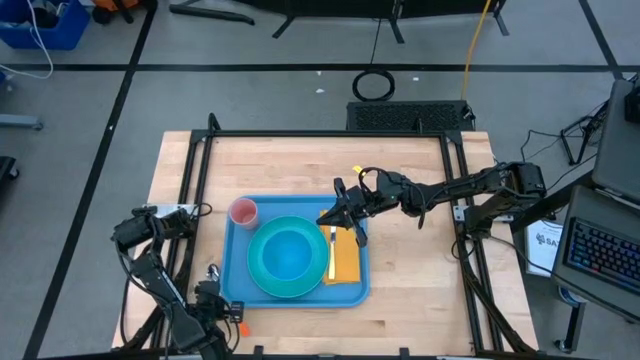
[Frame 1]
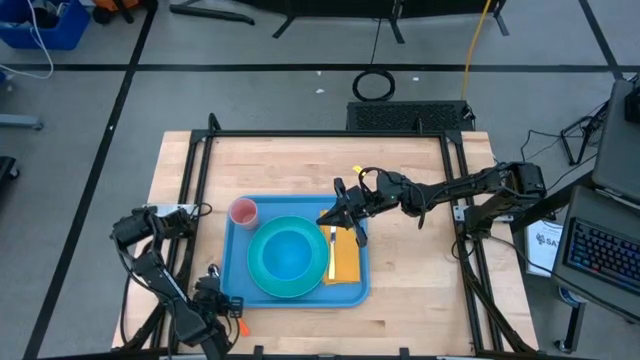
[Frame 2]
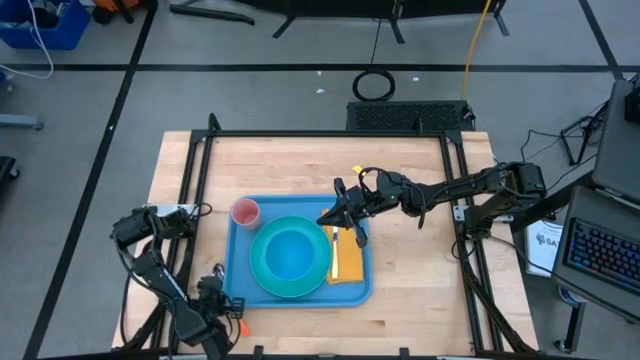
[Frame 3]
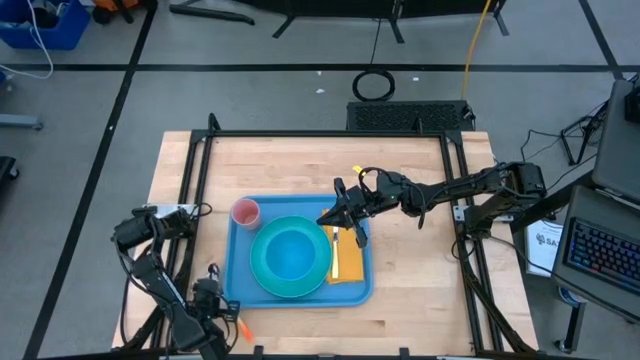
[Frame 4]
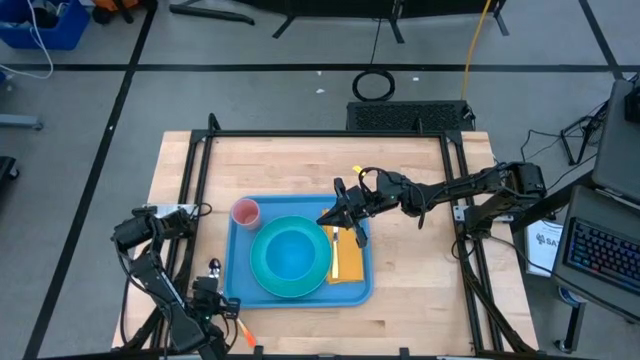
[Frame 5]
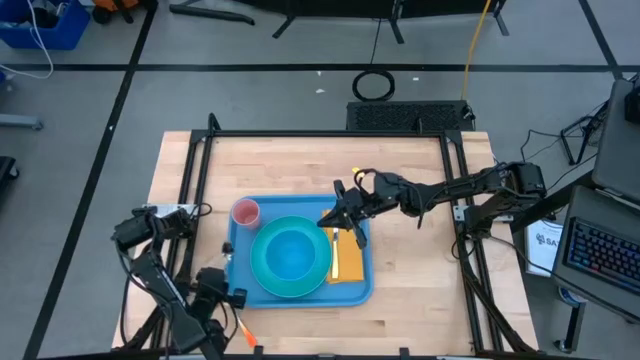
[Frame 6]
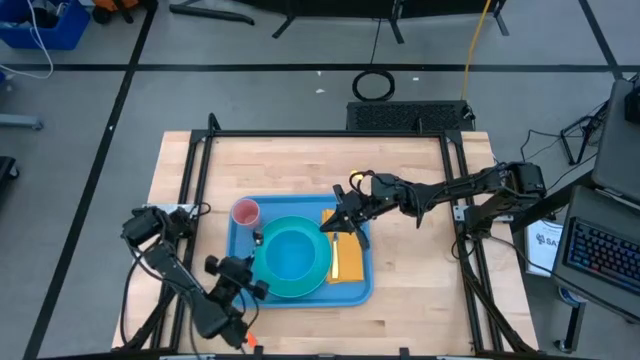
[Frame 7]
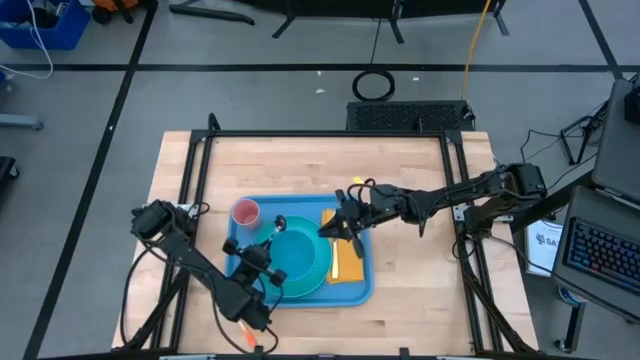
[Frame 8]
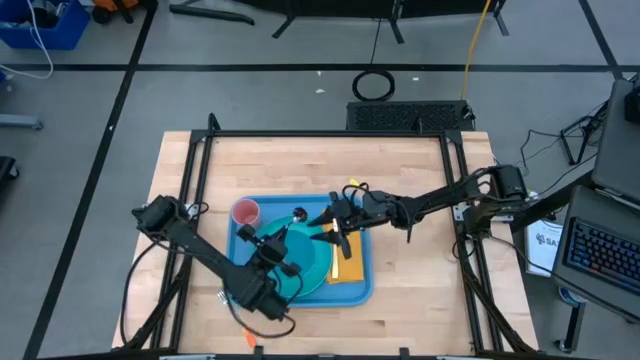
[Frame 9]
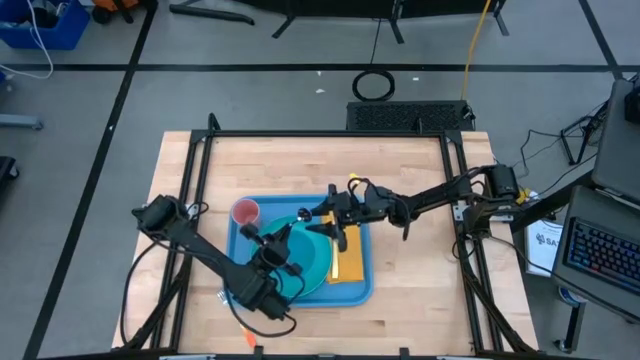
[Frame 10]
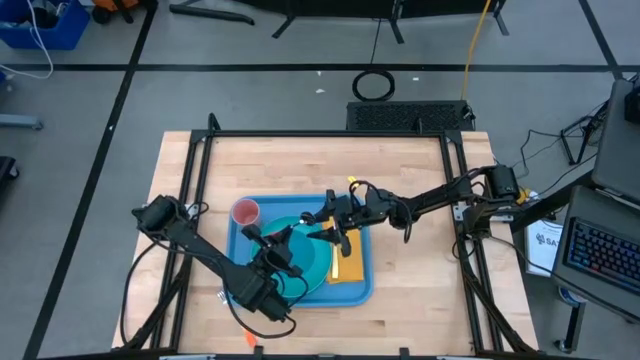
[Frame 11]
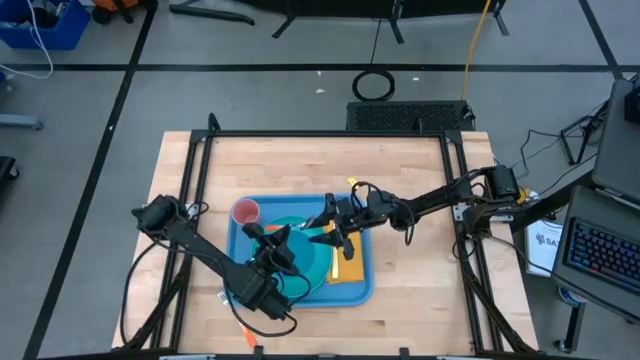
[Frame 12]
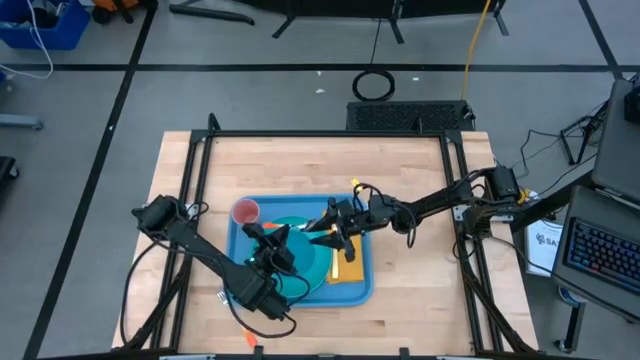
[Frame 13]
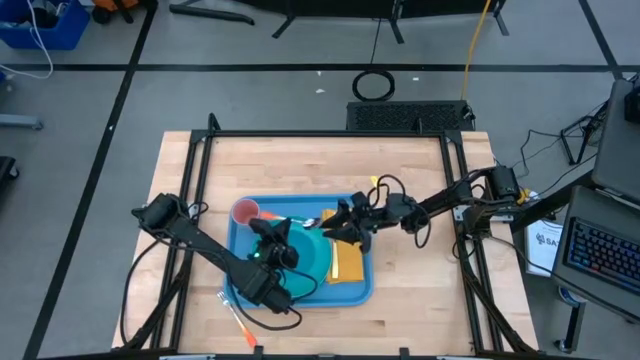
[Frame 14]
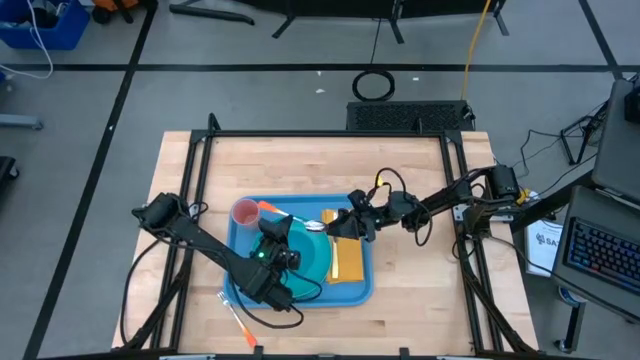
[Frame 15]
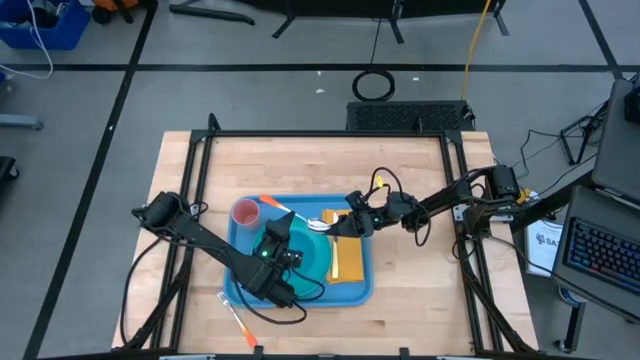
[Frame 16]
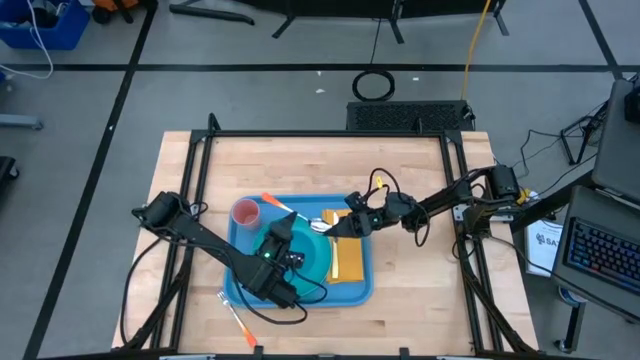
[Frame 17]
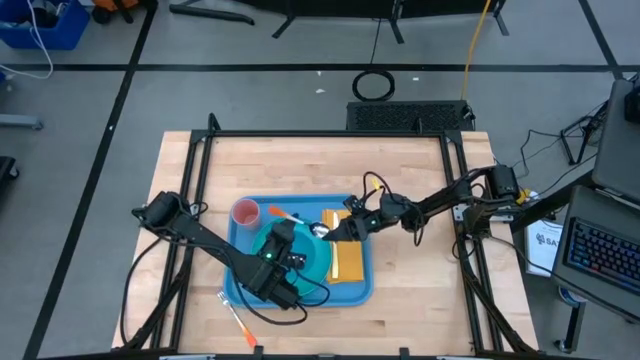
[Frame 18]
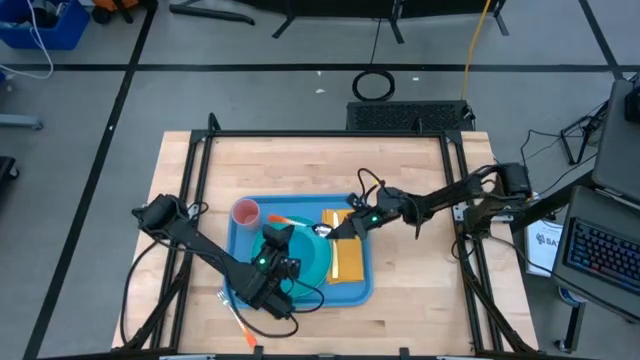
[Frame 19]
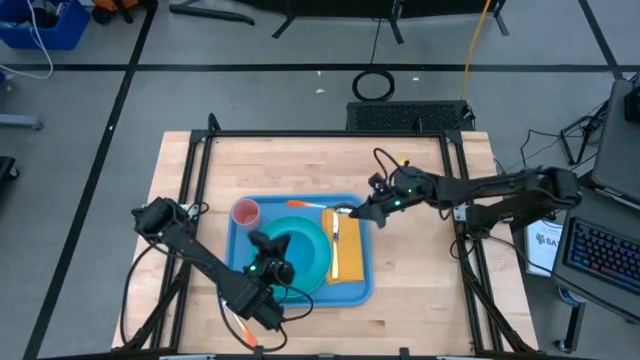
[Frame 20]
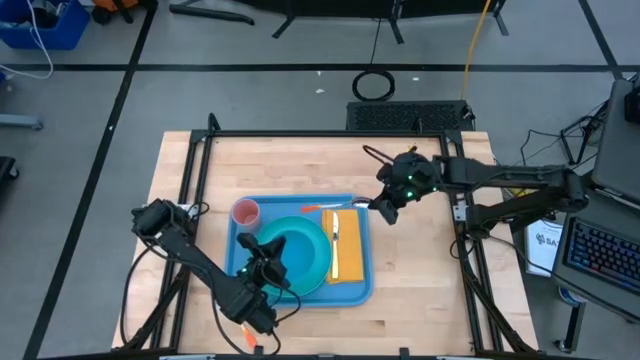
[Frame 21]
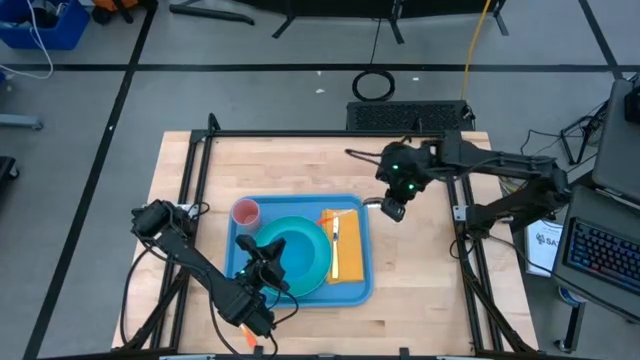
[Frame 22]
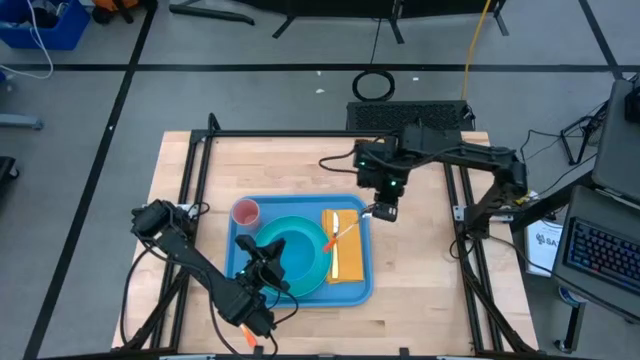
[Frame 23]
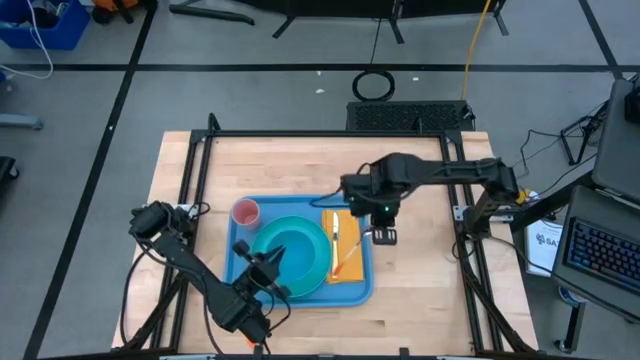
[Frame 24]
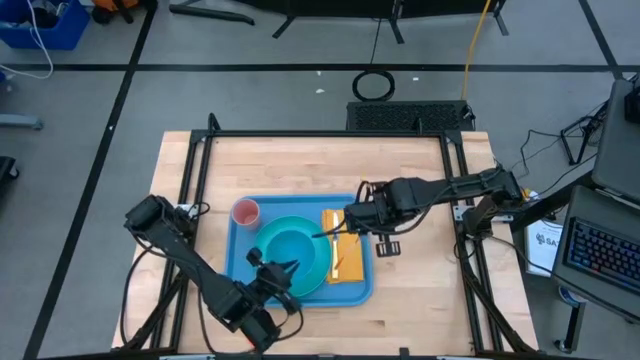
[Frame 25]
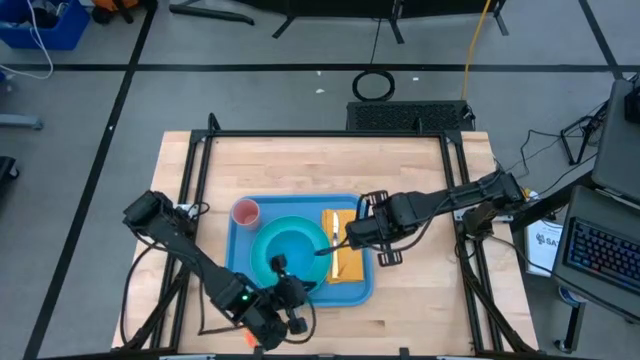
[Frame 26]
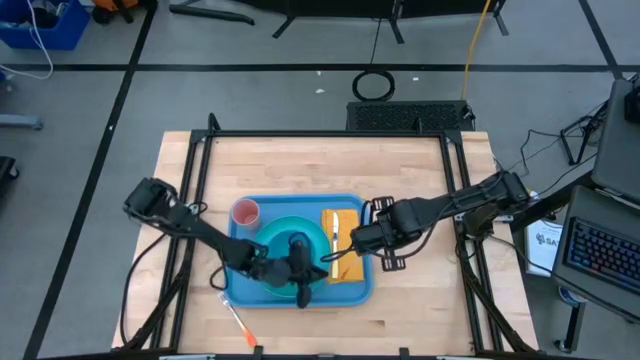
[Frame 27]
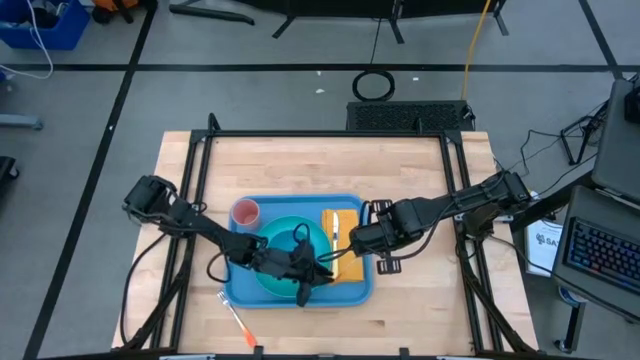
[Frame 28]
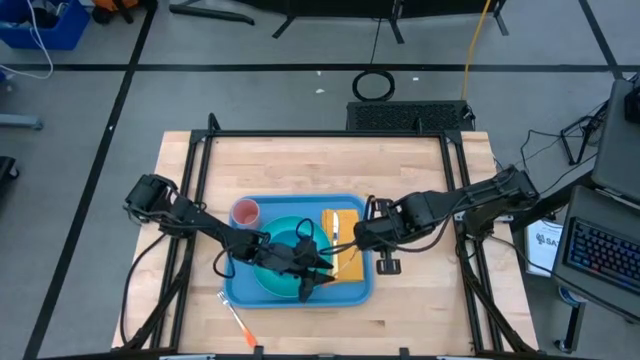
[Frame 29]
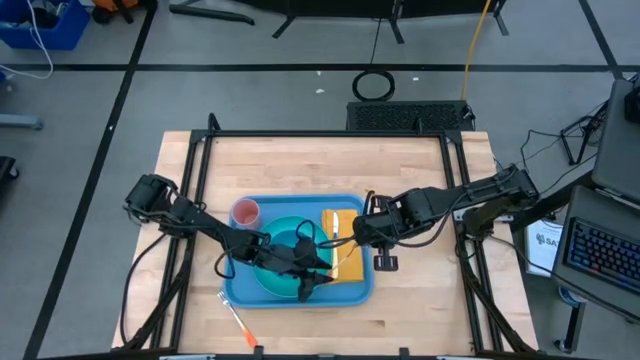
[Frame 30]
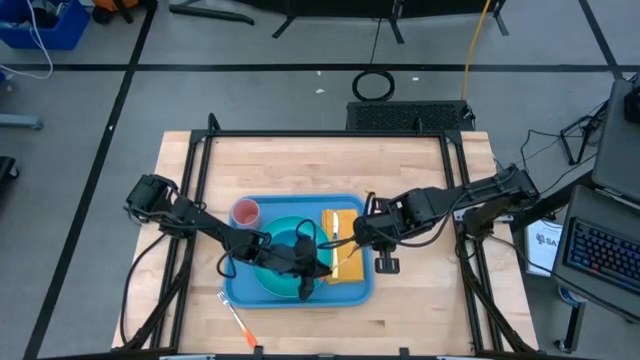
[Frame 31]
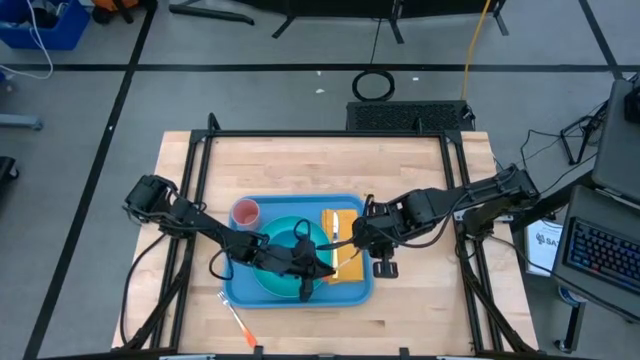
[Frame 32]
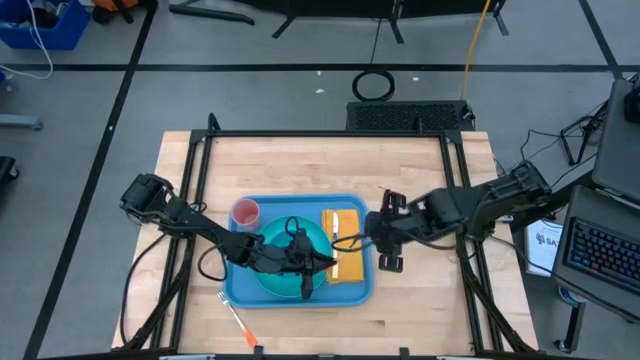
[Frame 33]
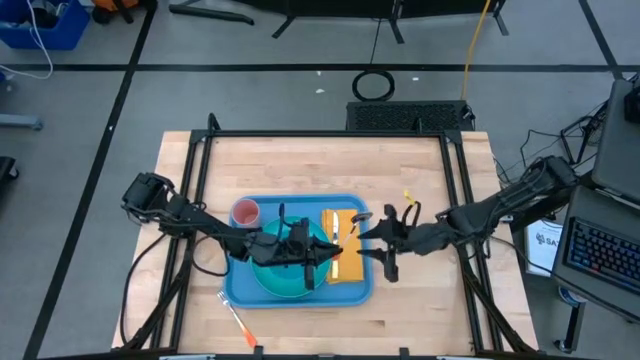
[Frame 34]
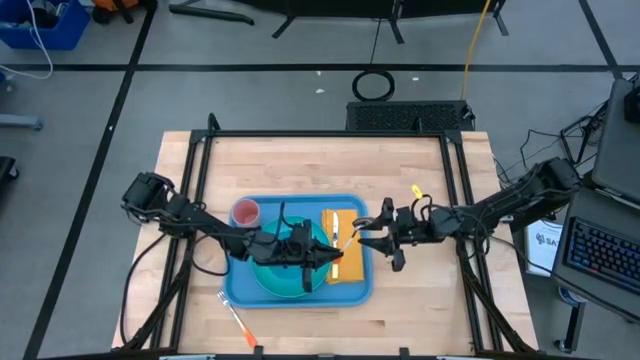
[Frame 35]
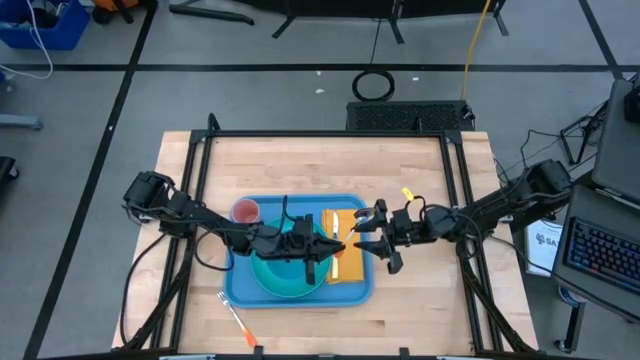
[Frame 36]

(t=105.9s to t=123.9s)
Task: Set up tray
Put the orange spoon on the yellow napkin to the right of the yellow knife

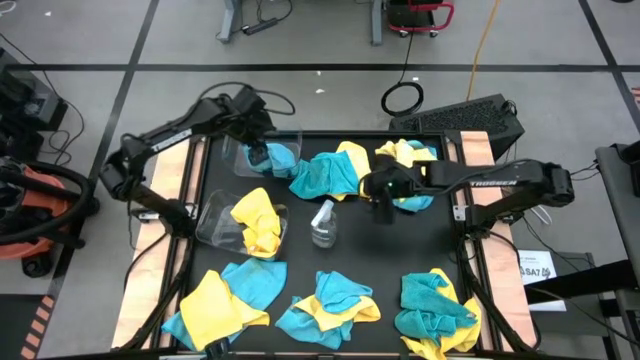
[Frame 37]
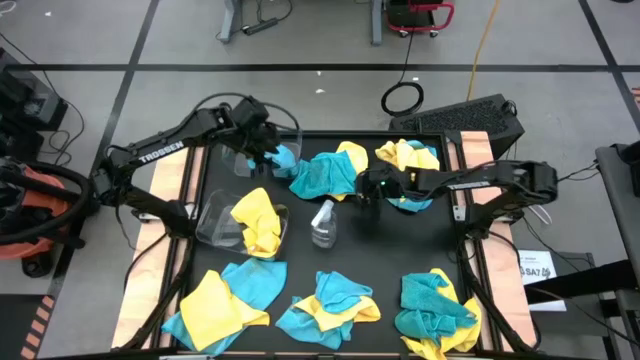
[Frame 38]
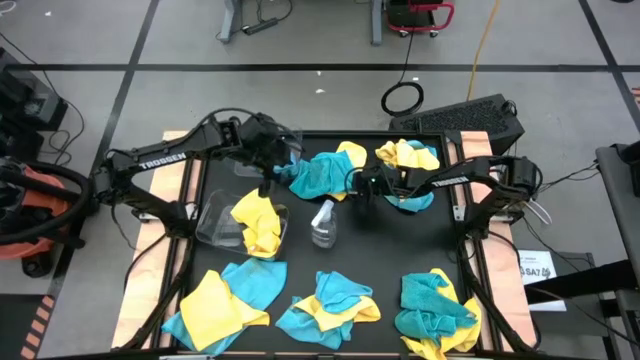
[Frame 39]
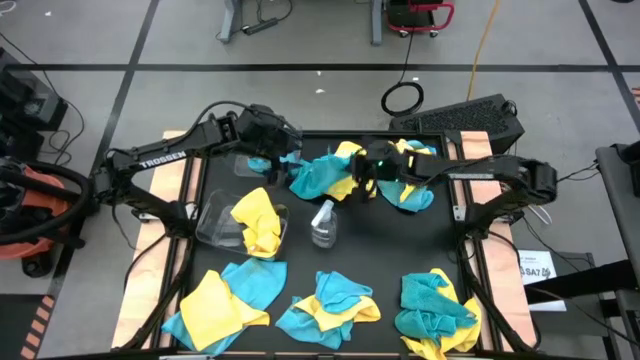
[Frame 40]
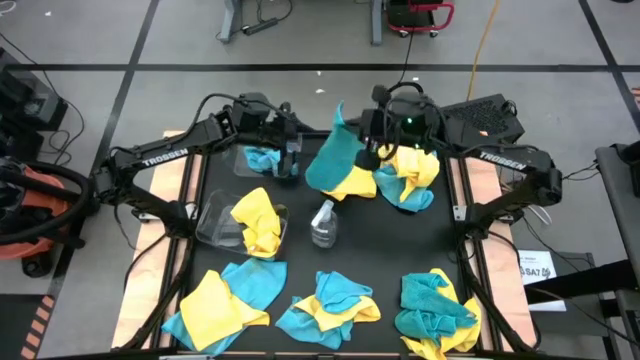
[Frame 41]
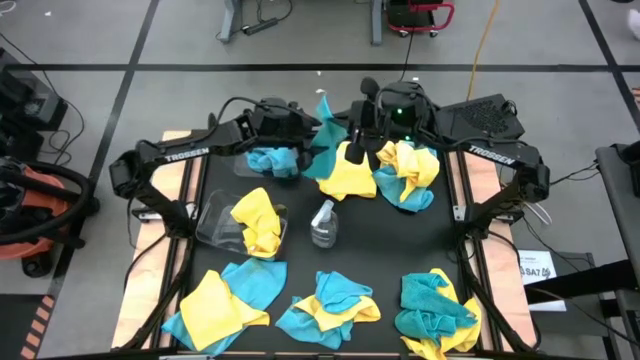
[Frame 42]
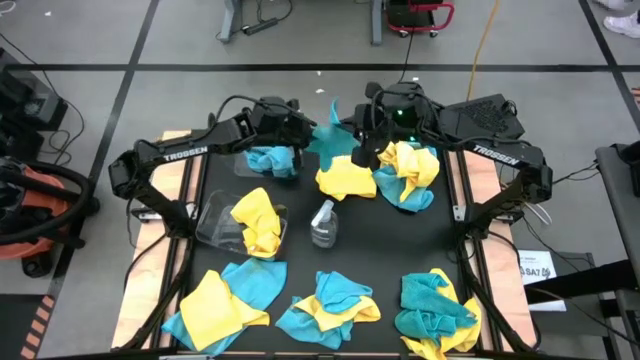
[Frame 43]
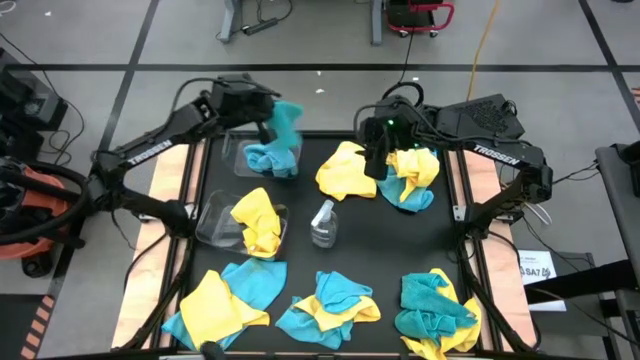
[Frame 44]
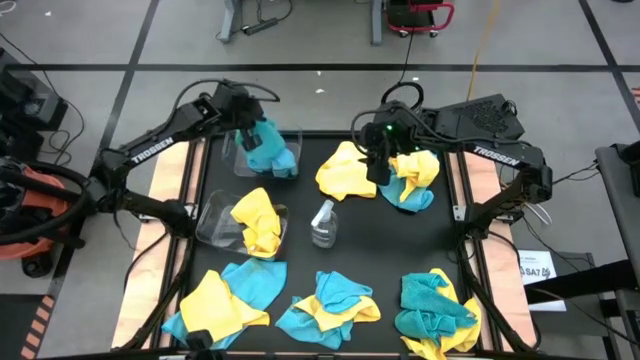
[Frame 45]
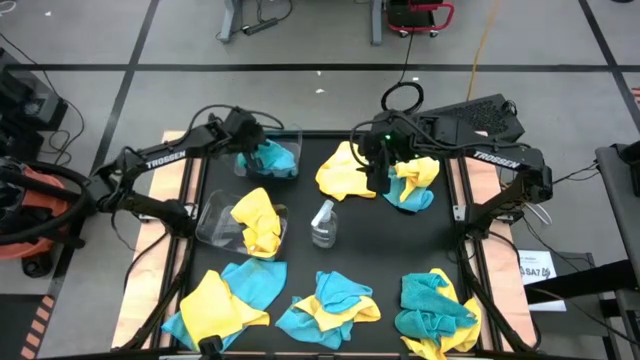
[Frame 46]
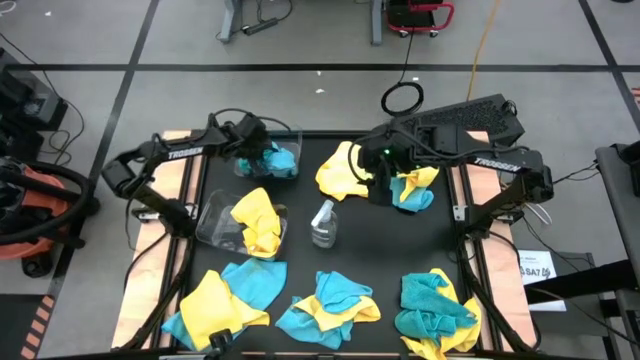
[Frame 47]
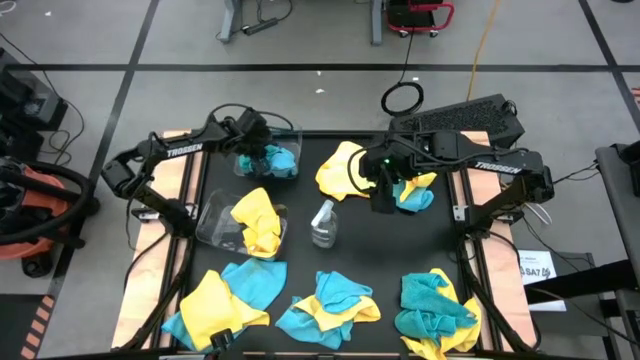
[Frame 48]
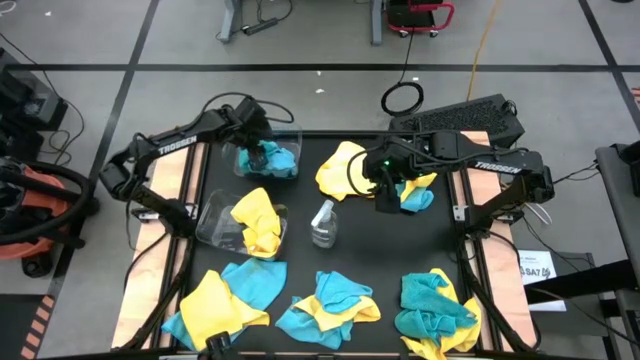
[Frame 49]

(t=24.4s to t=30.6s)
Task: Sort microfiber towel by color & place in baskets
Put the blue microfiber cloth into the top transparent bin
